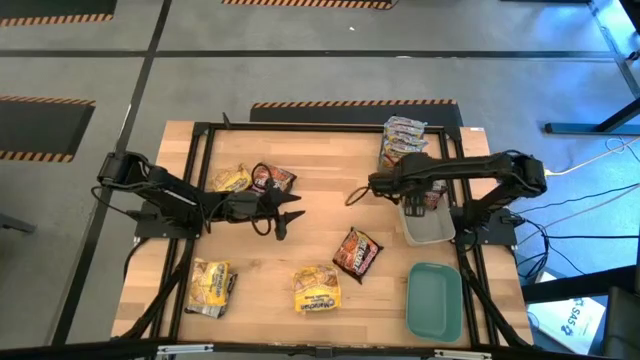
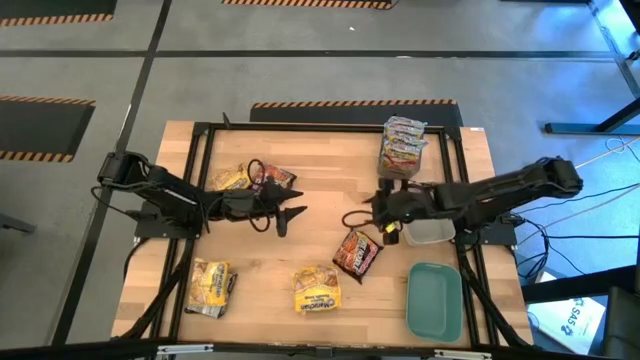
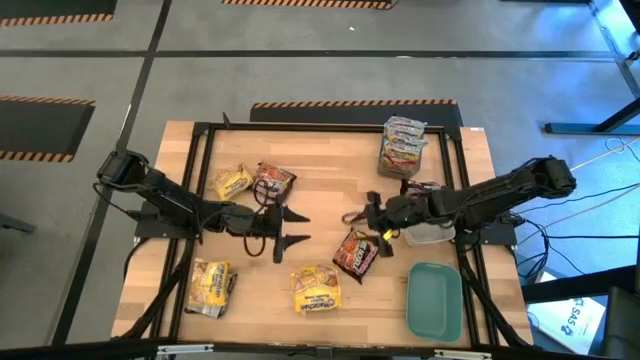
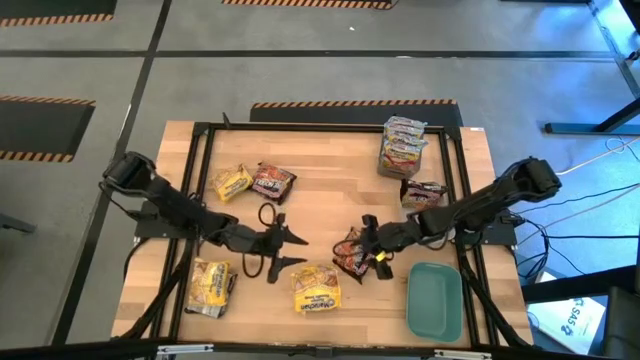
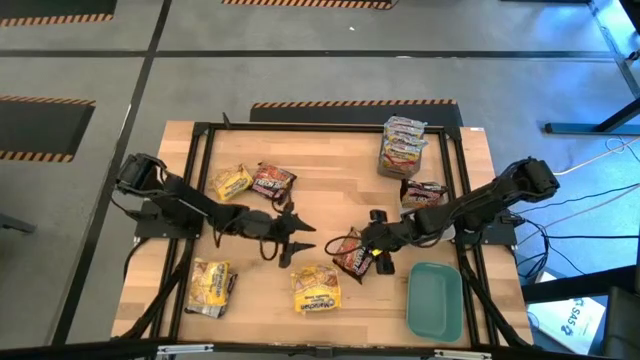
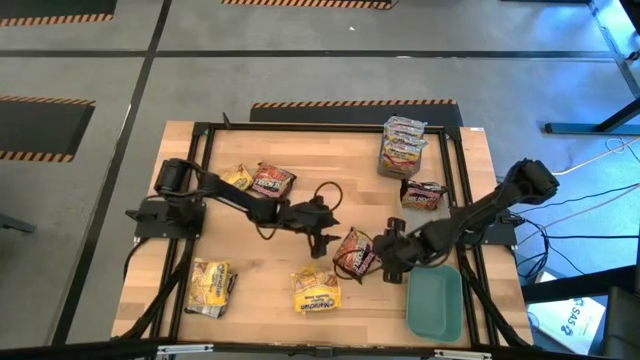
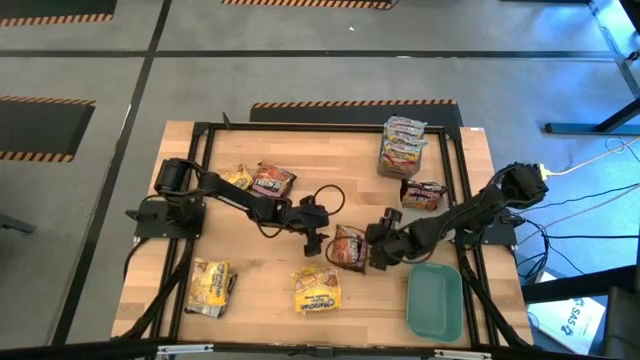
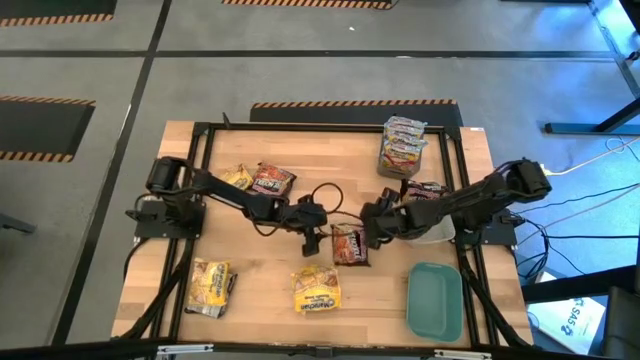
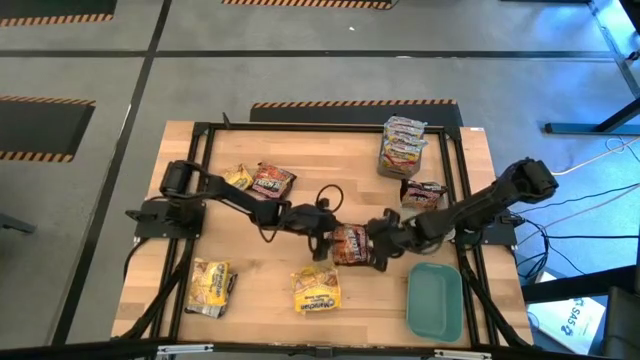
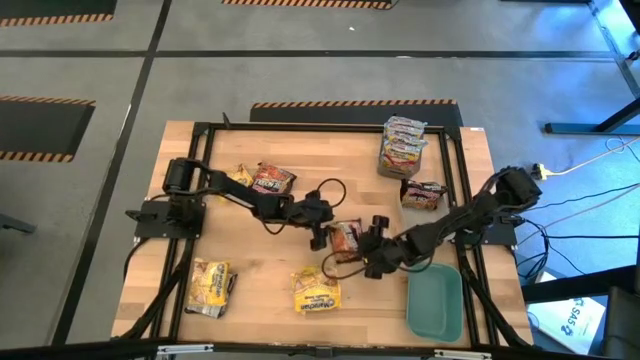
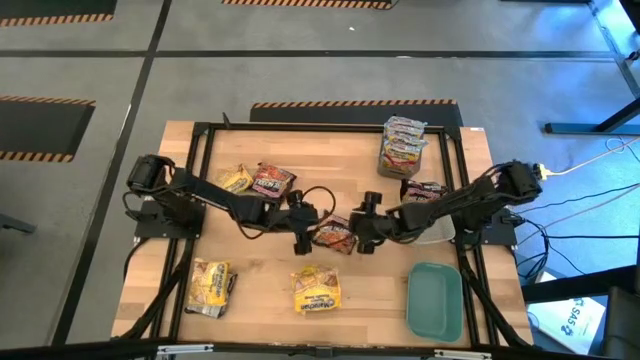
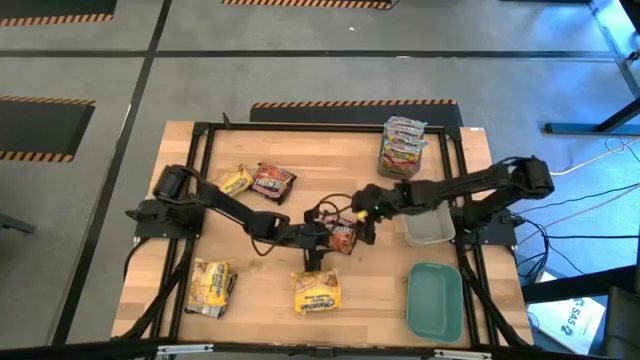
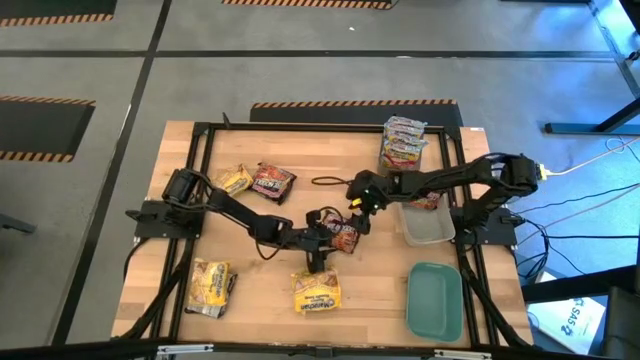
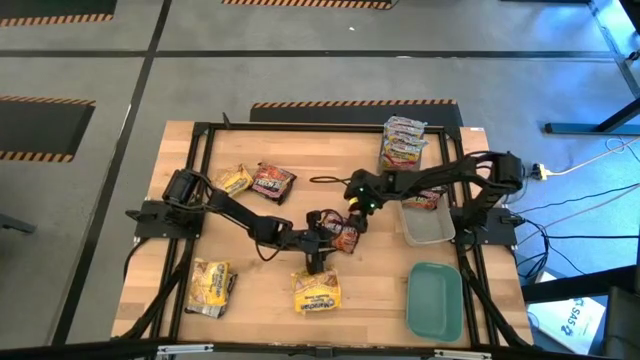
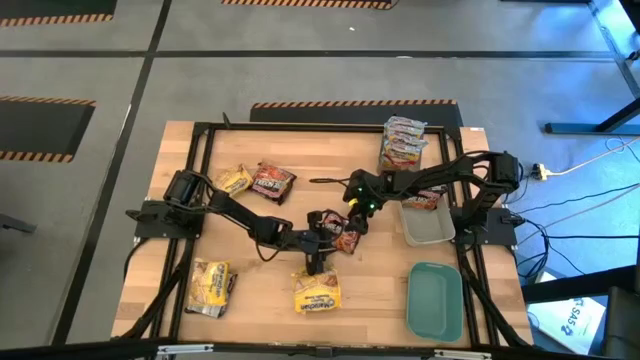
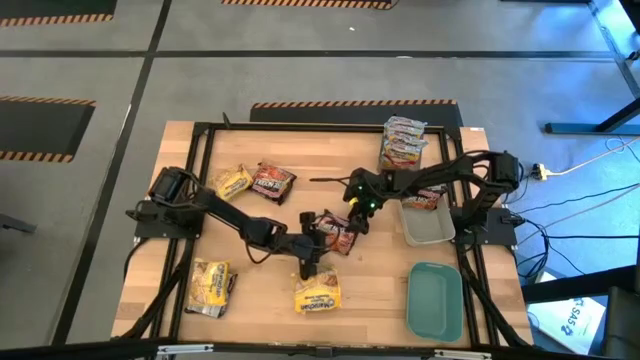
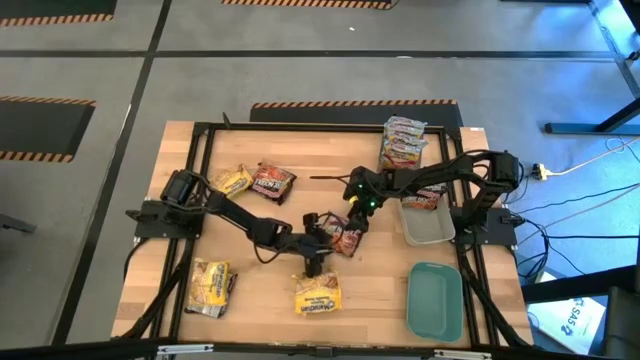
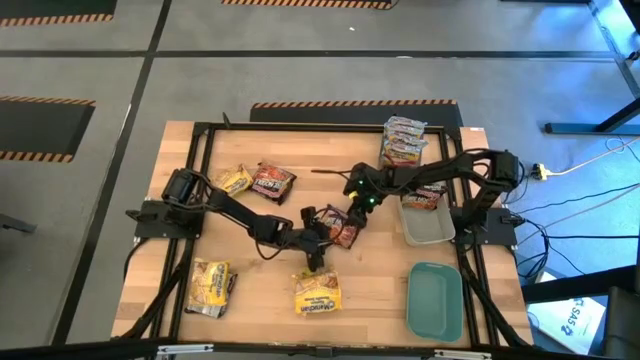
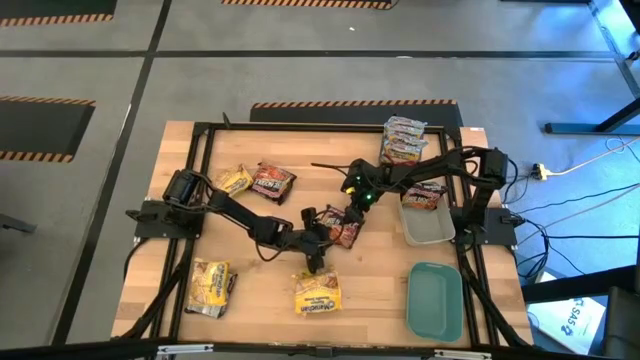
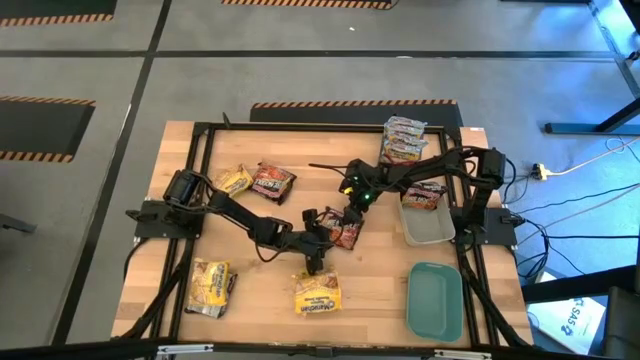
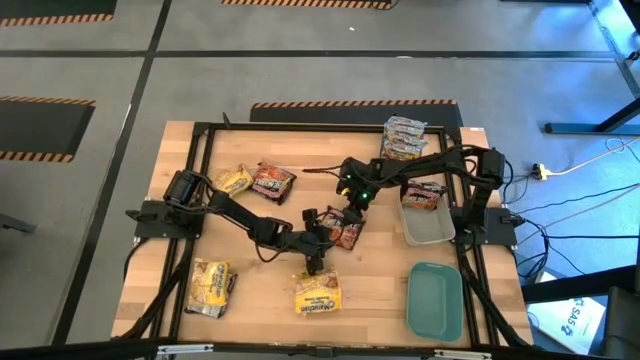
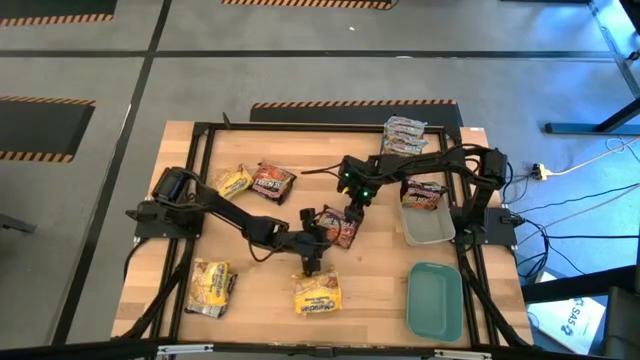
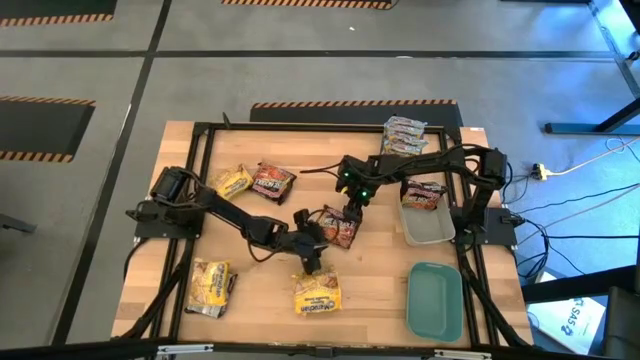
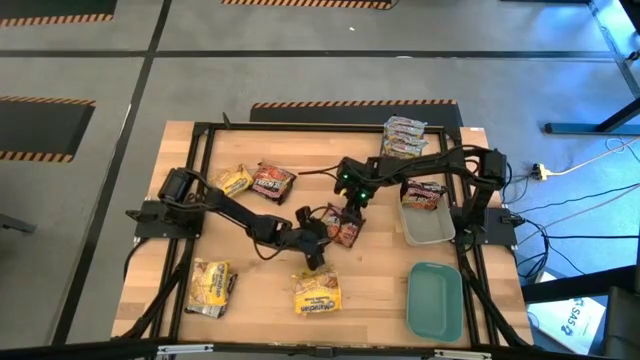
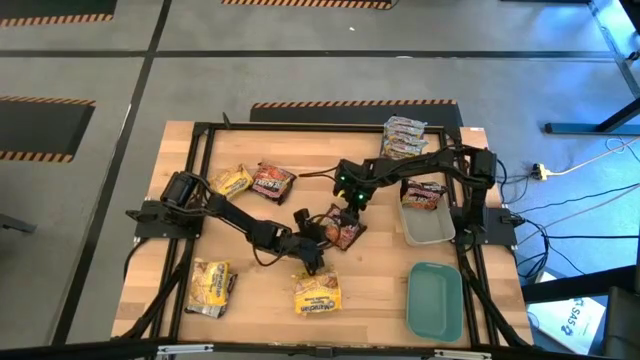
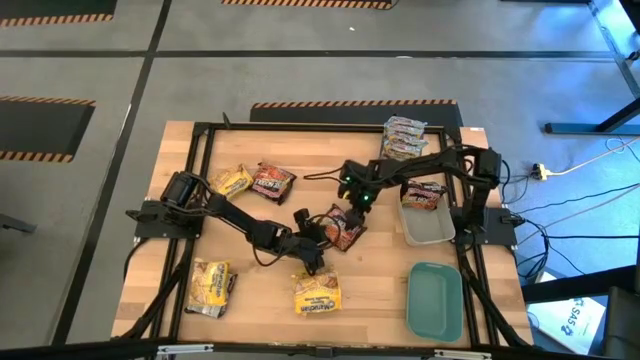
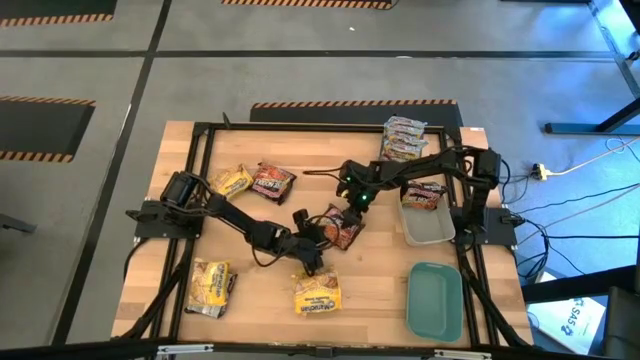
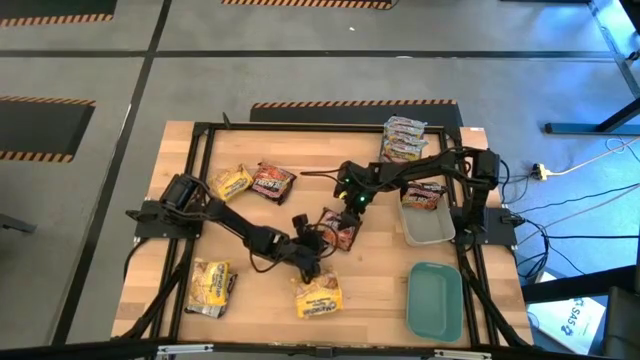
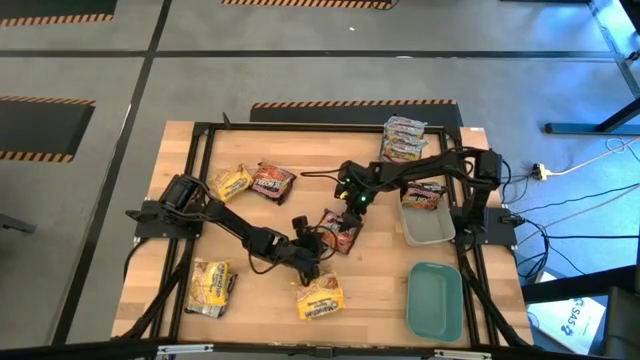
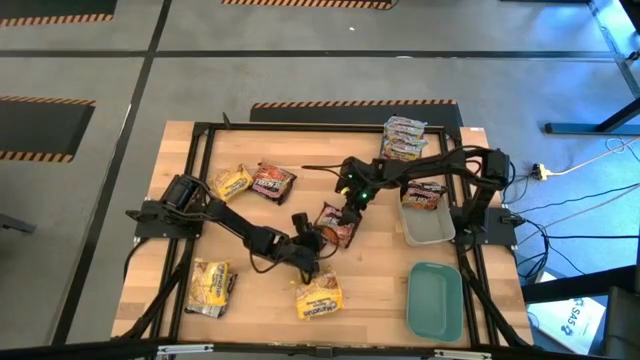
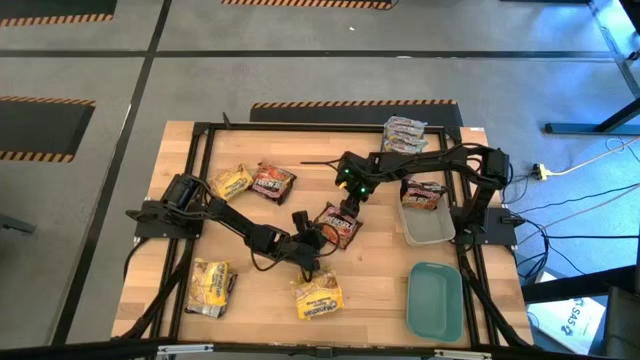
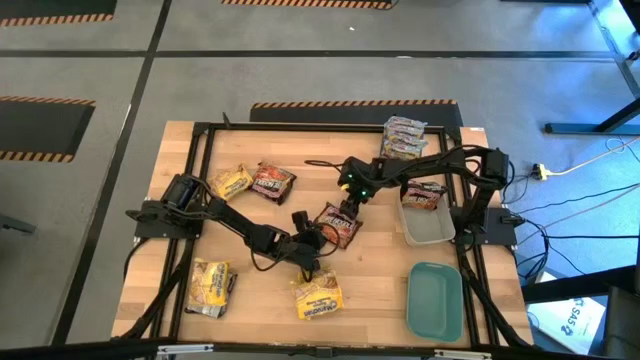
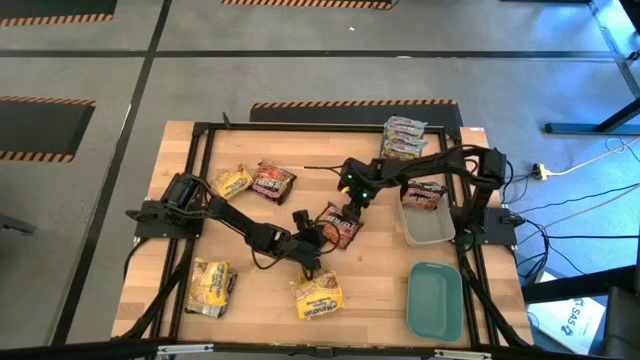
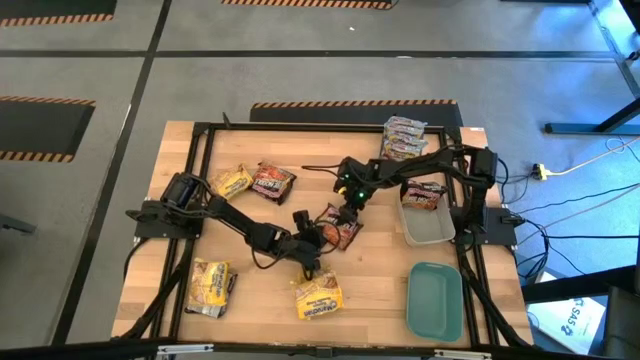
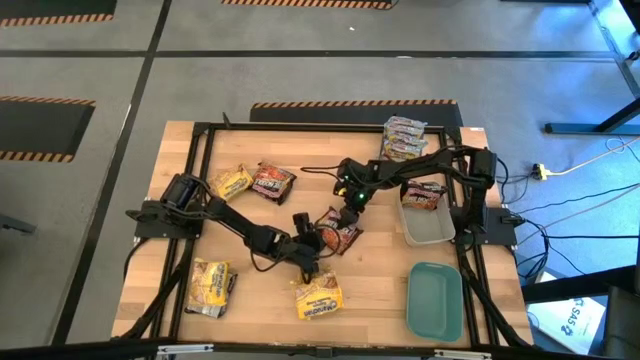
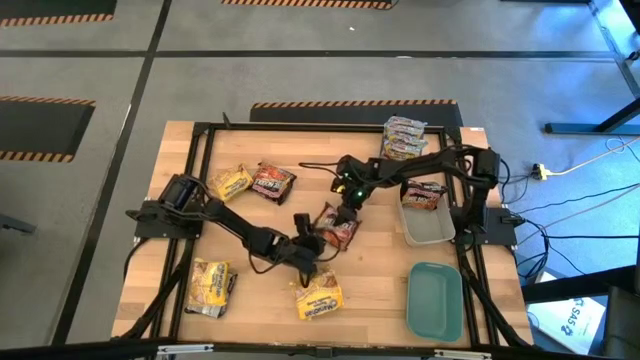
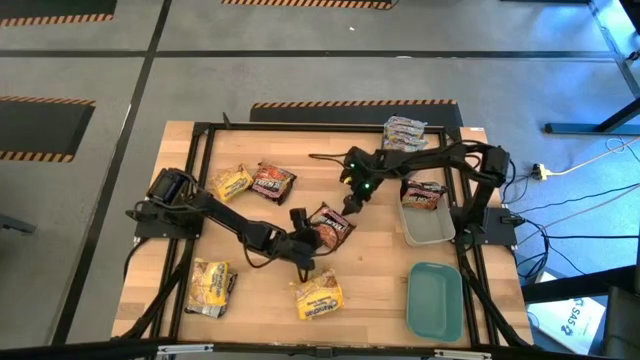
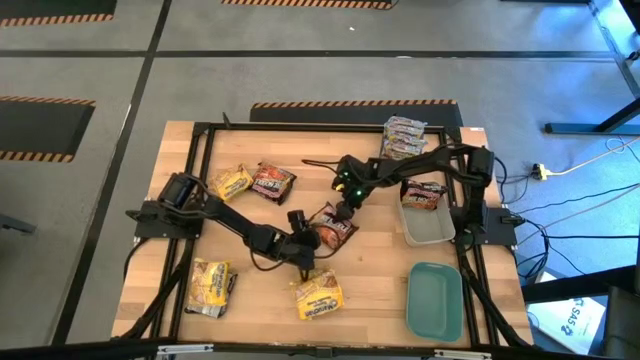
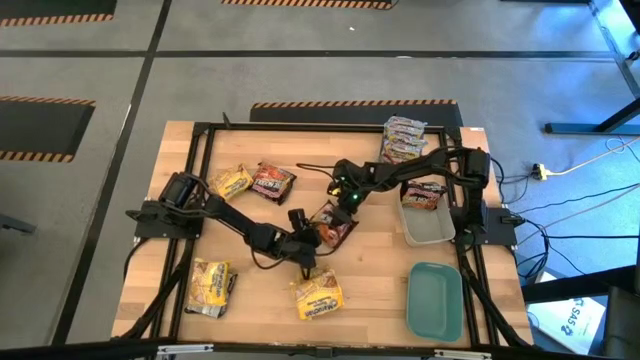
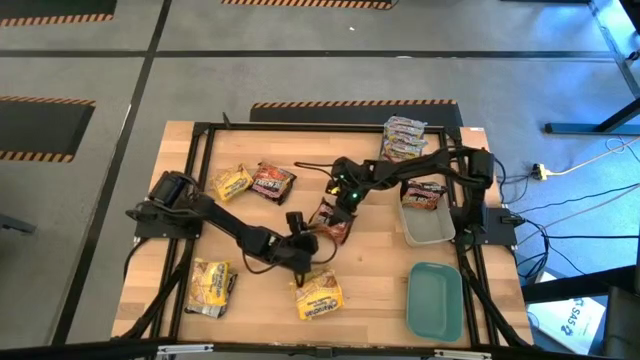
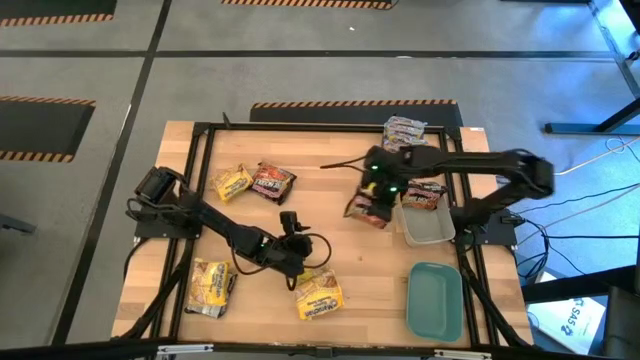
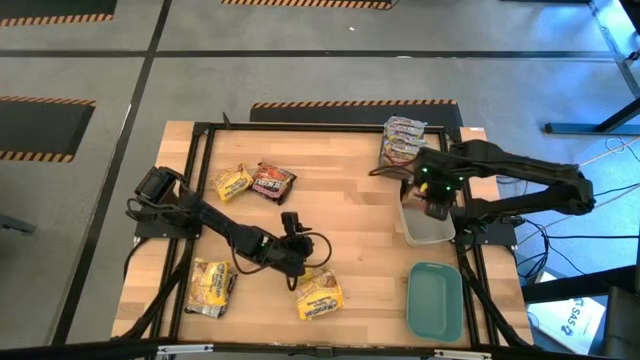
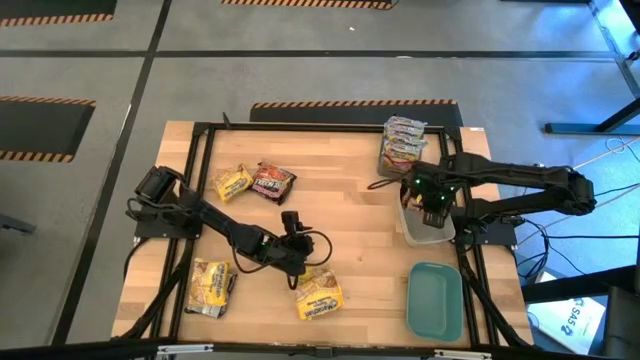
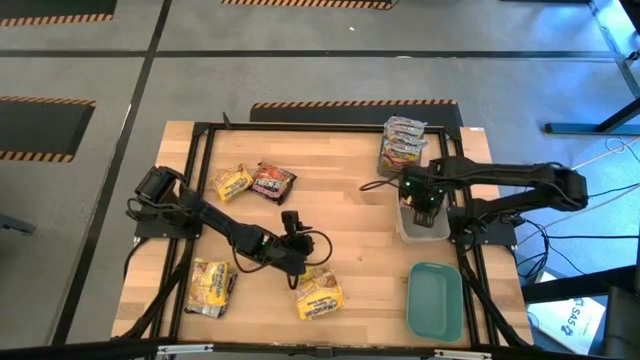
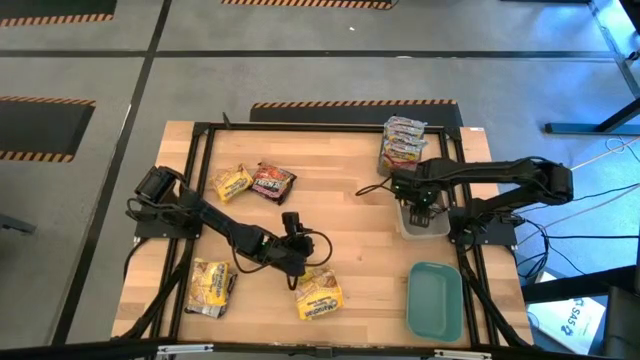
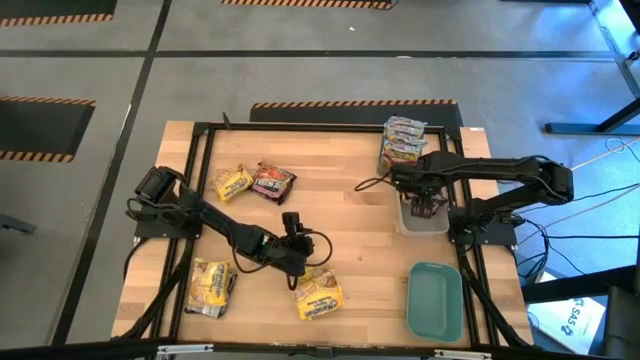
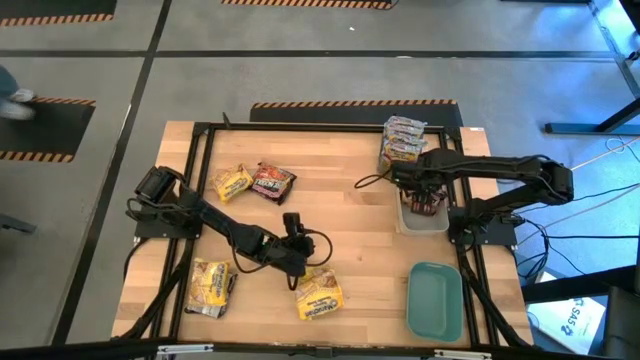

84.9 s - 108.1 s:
Task: Sort Maruchan noodles
Put the black noodle pack into the gray bin
